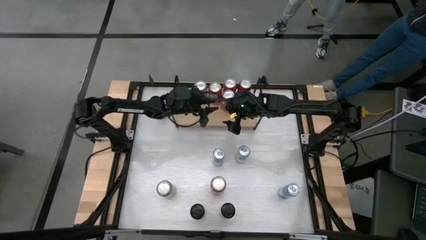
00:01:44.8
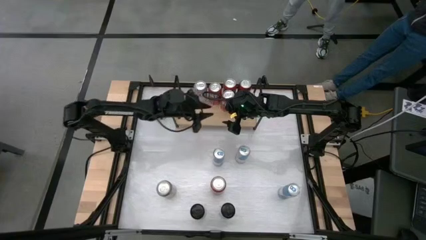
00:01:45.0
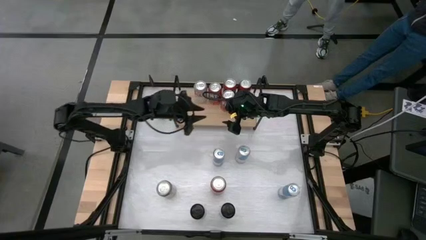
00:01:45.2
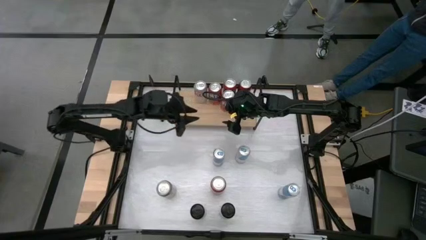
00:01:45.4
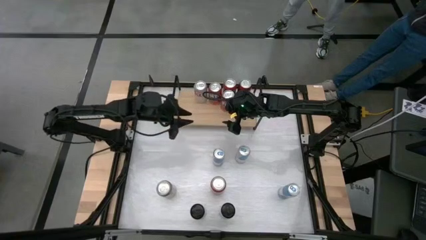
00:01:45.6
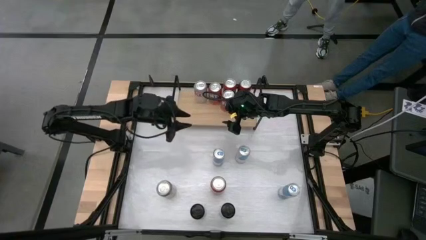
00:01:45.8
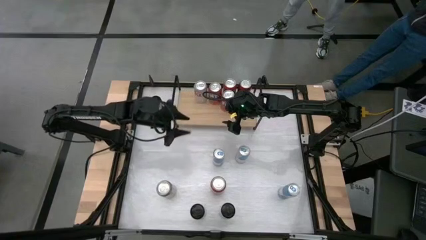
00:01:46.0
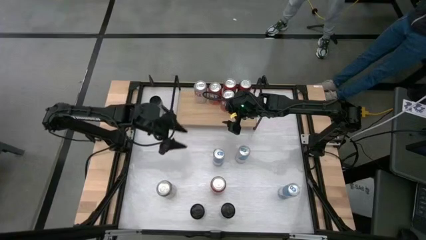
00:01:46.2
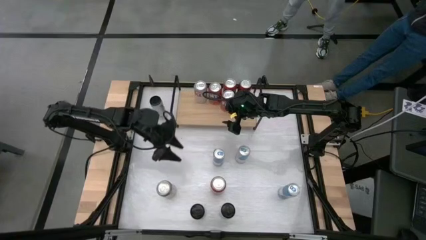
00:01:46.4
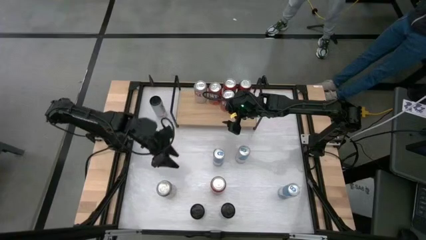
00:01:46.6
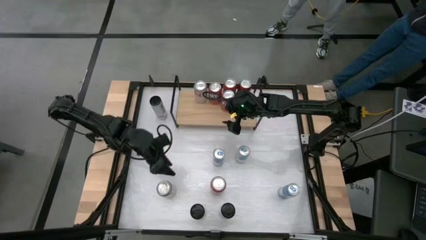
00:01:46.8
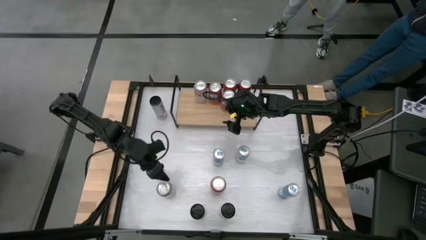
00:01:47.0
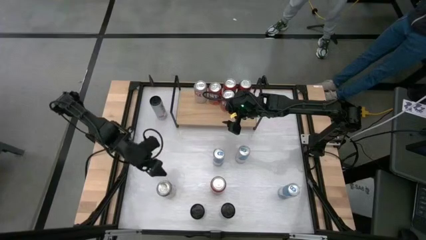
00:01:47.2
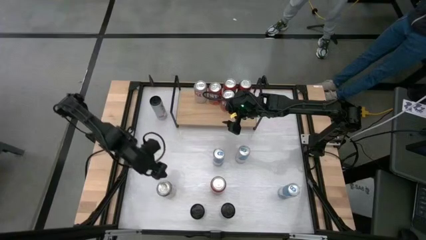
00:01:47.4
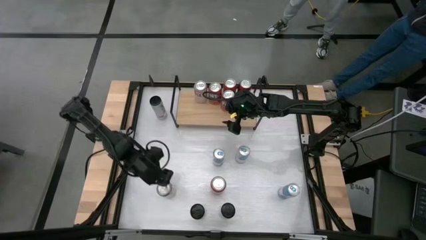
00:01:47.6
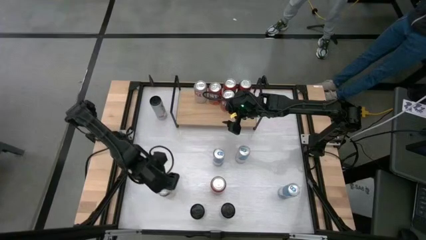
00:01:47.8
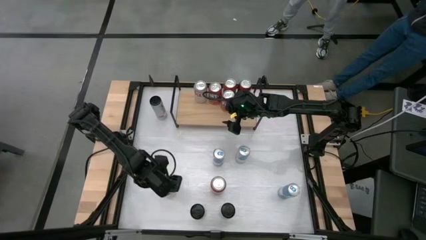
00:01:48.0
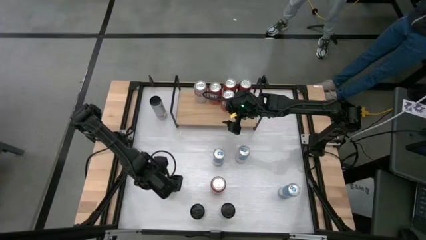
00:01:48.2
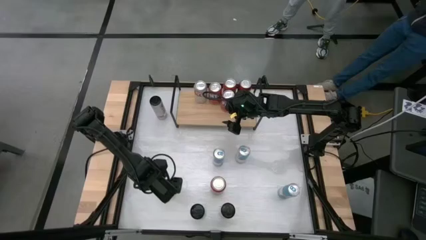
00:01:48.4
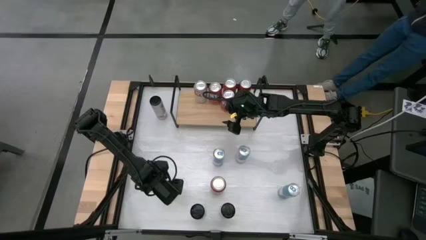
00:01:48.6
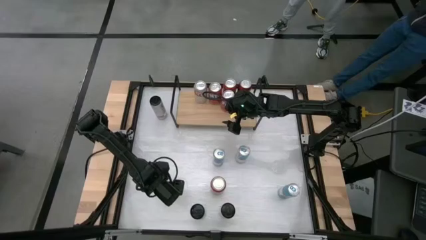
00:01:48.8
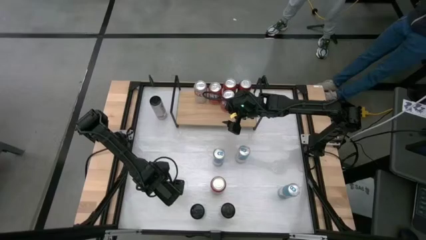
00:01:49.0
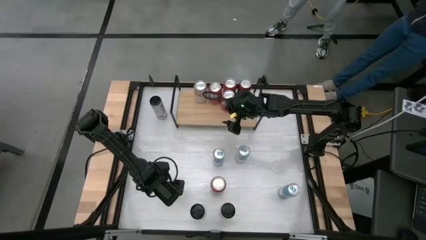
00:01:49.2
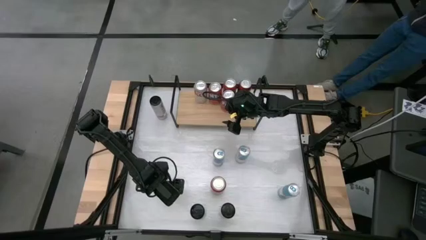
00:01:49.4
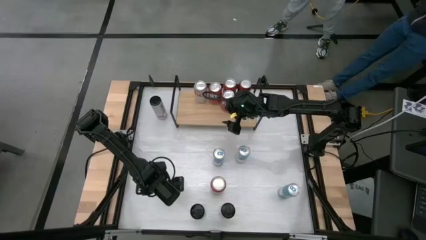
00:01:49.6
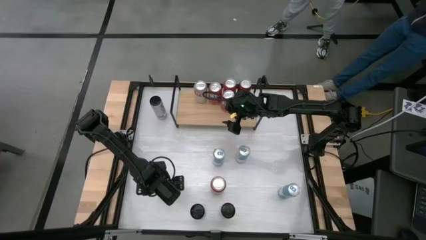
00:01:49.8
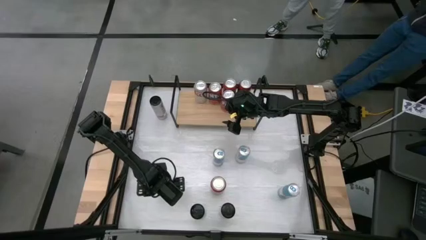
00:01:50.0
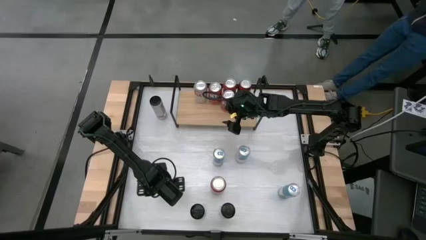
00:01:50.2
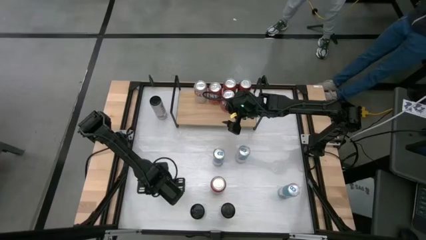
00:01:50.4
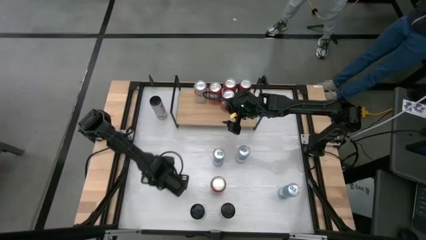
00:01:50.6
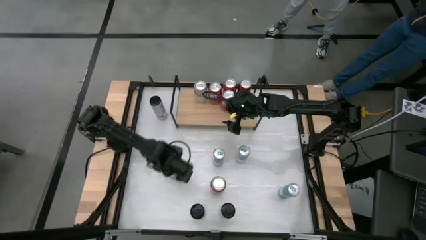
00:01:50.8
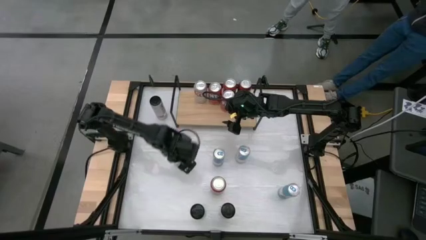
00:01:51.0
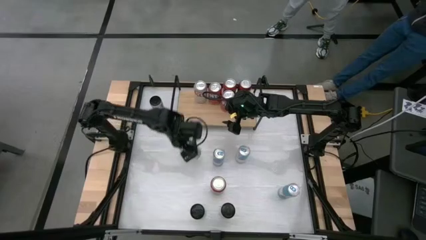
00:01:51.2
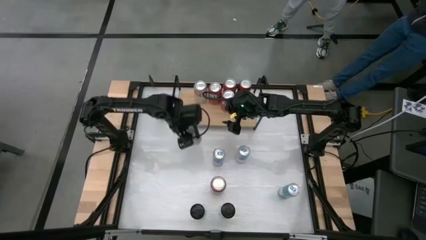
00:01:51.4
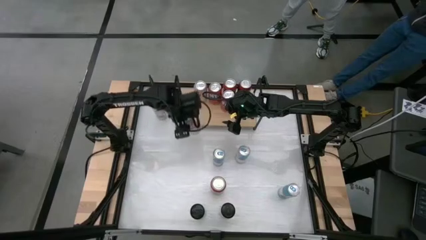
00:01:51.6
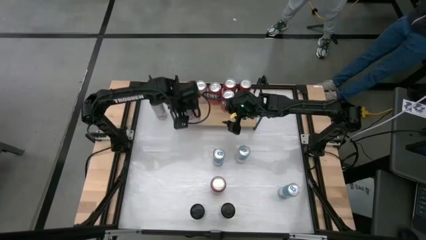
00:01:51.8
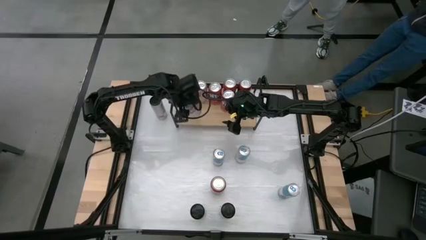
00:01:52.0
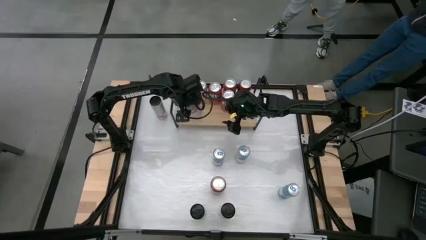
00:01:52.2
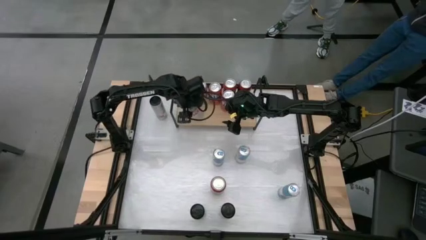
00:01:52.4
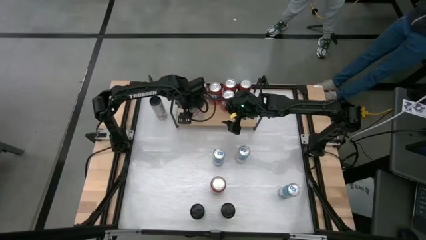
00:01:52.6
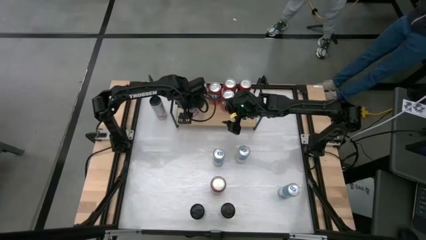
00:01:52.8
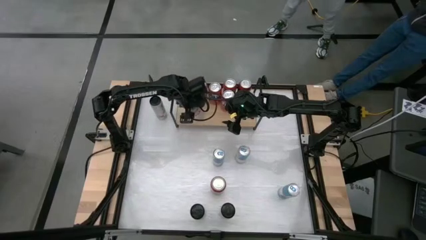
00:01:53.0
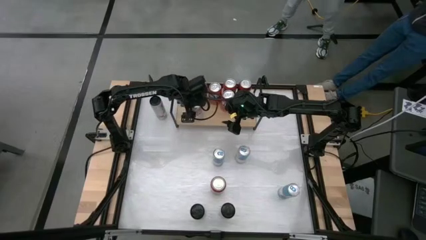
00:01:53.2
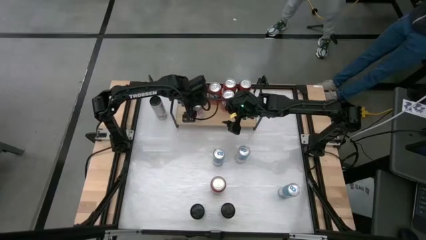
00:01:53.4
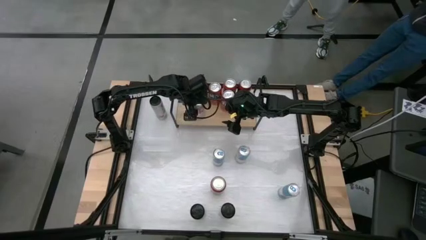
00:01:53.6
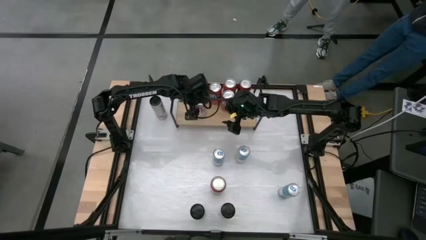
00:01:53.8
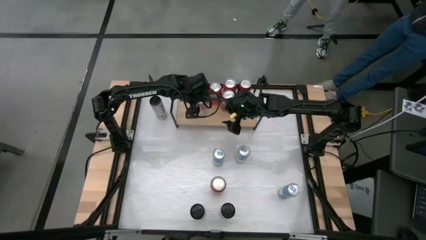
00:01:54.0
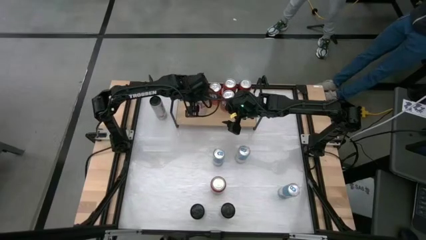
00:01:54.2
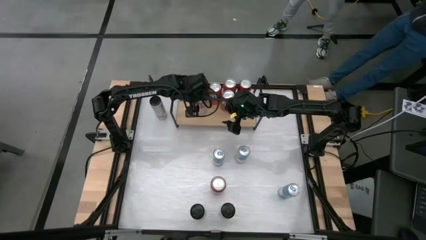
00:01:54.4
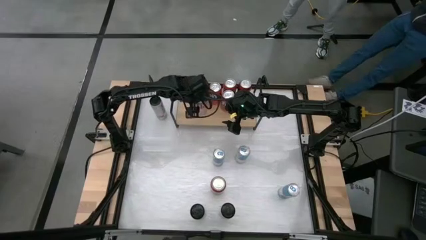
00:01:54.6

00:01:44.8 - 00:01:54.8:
Task: Place canned beverage on shelf
Put the red and silver soda can on the shelf aligned with other red and silver soda can
